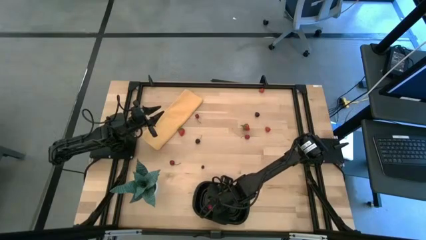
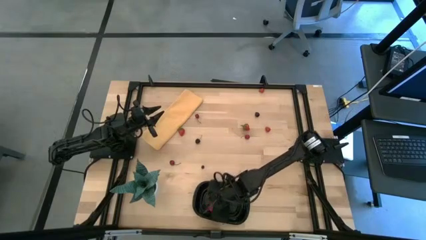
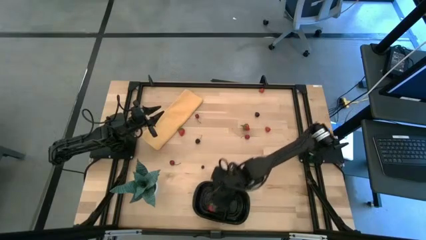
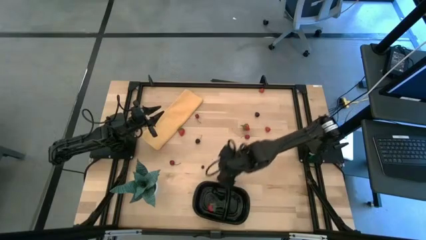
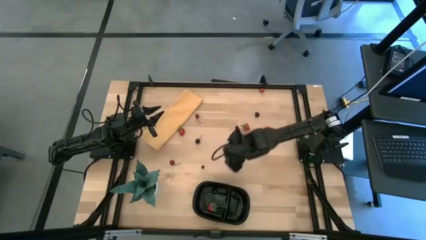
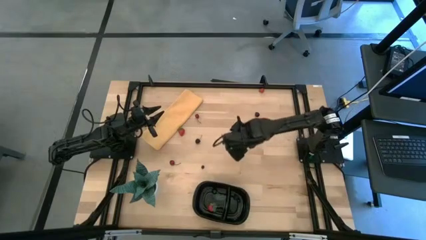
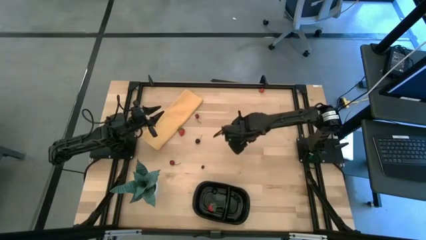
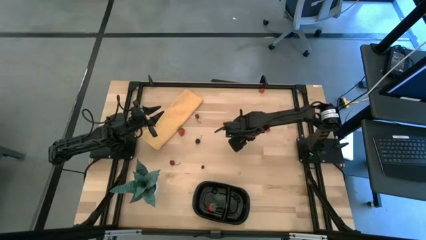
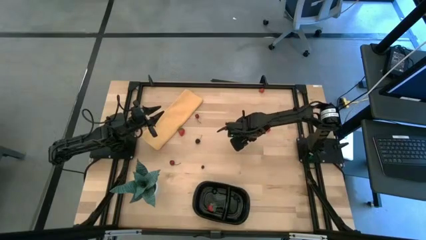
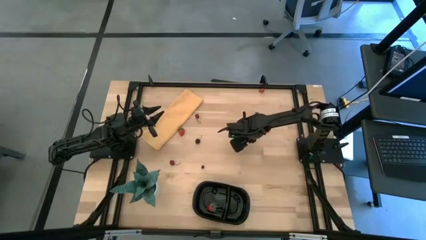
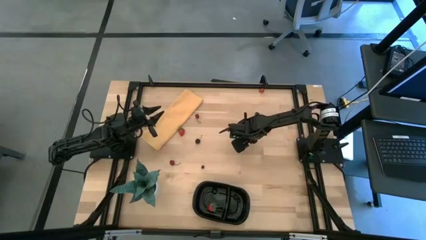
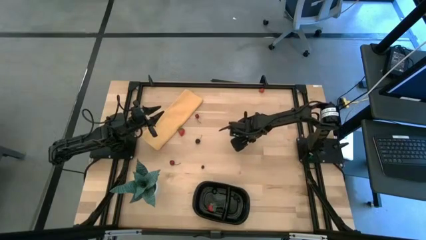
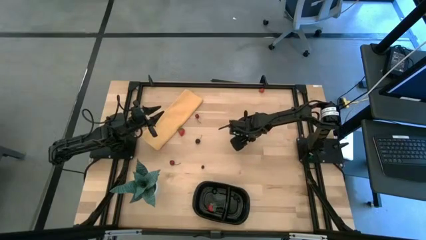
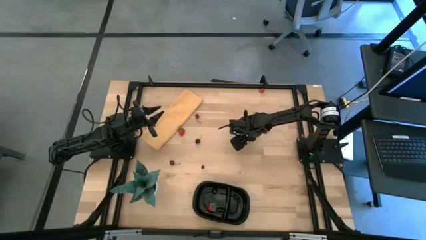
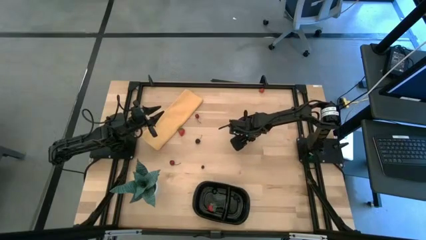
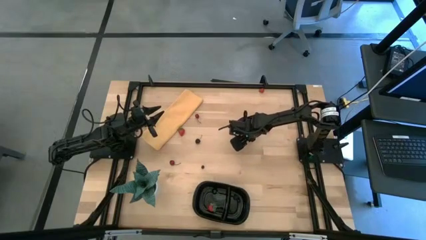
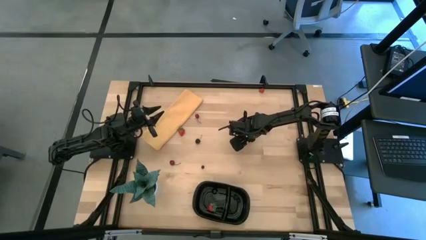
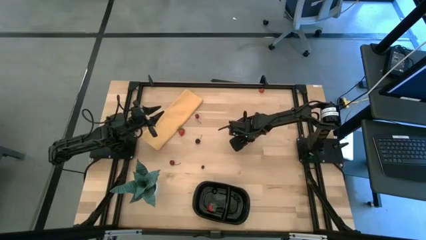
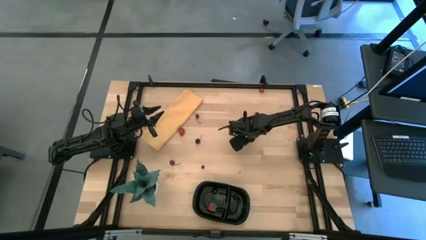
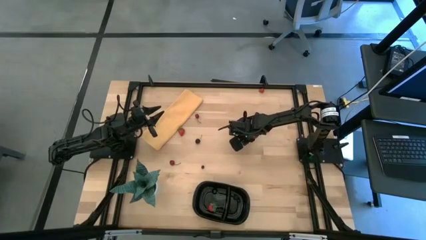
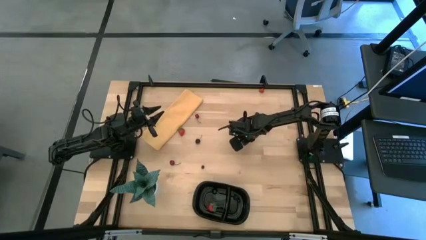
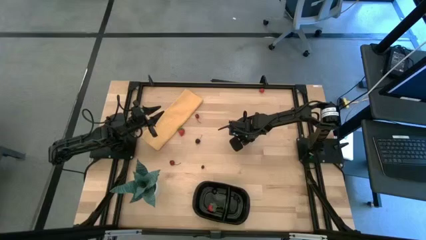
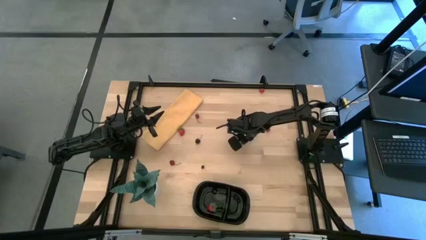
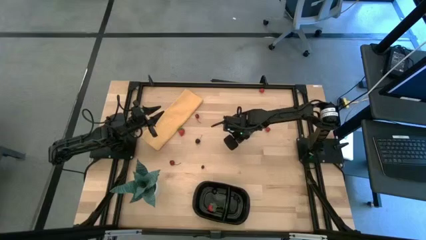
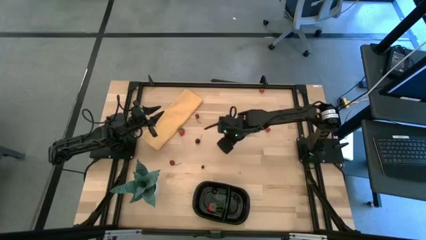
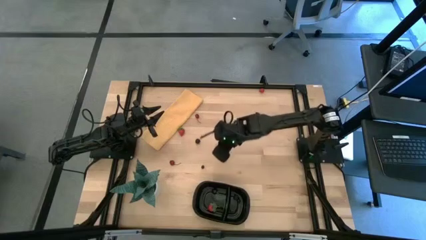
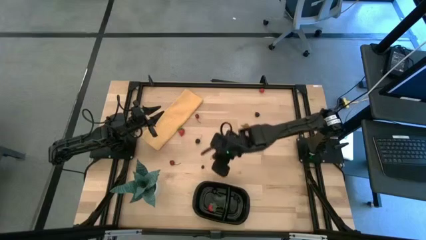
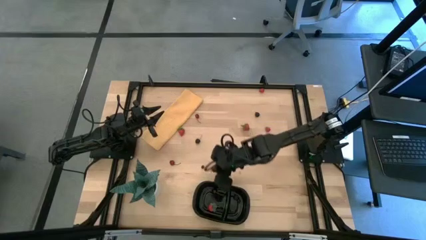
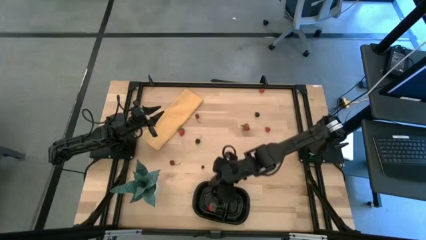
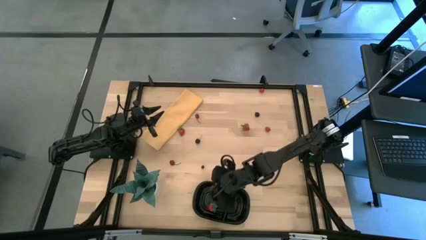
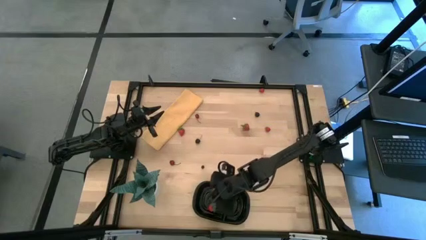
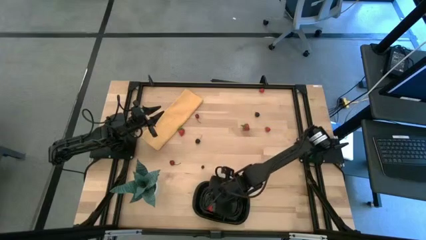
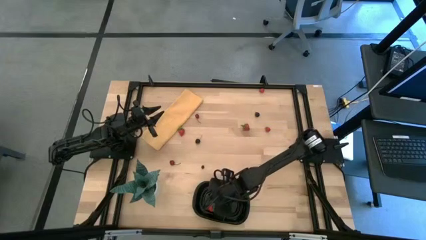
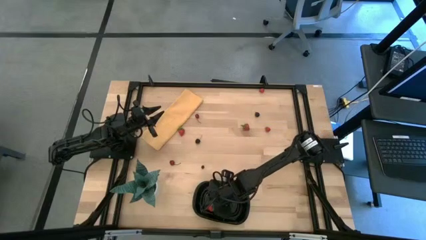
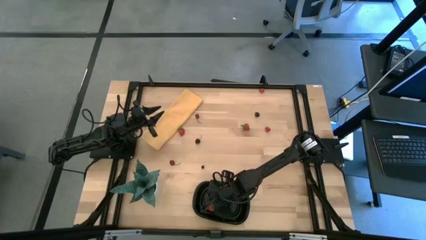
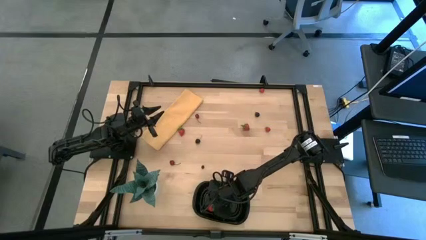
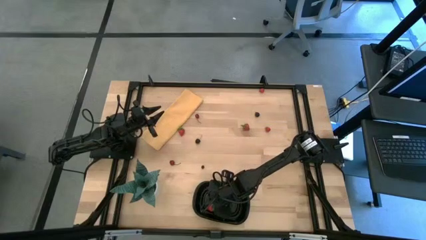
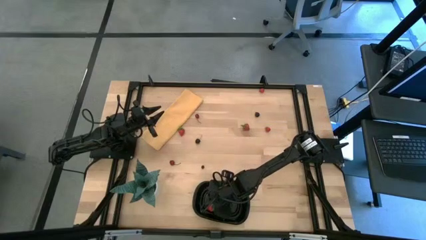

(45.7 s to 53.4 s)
Task: Pick and placing Produce into tupperware
Put the top right red cherry into the black container

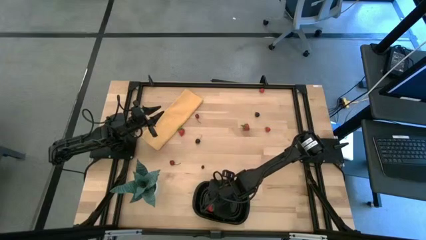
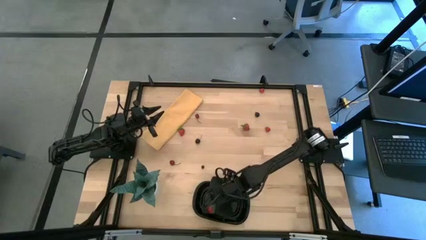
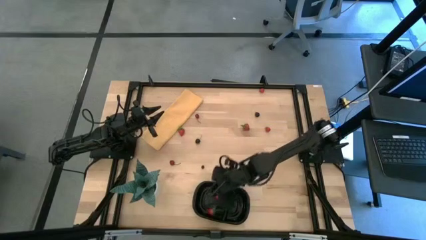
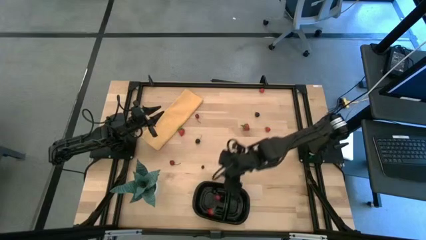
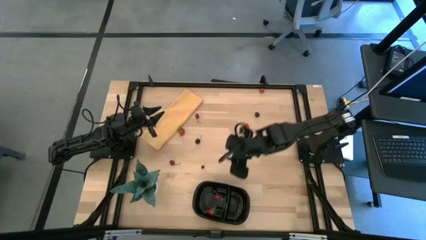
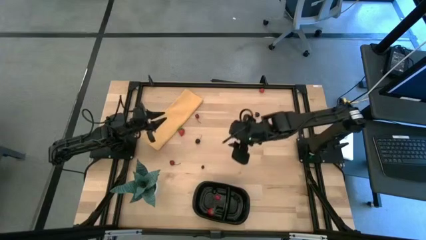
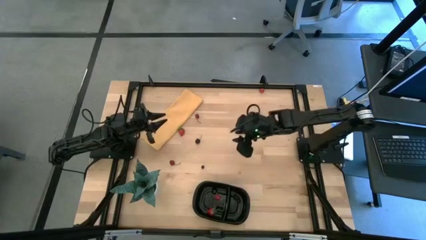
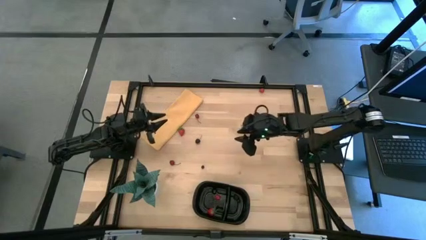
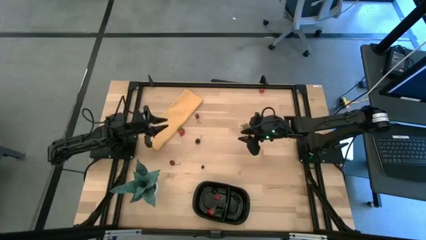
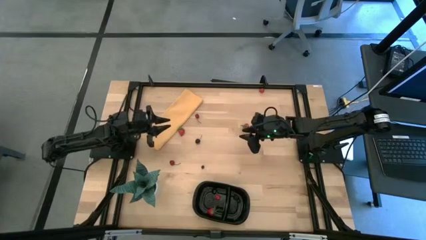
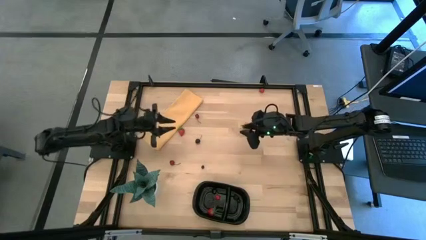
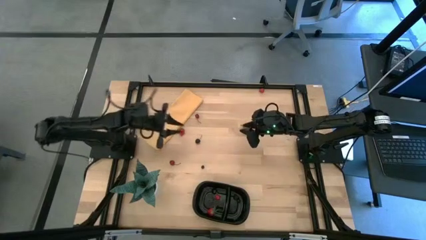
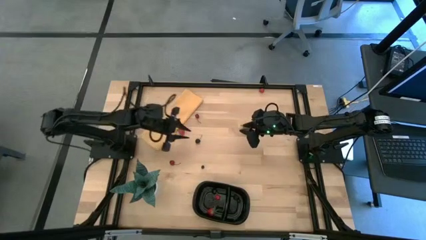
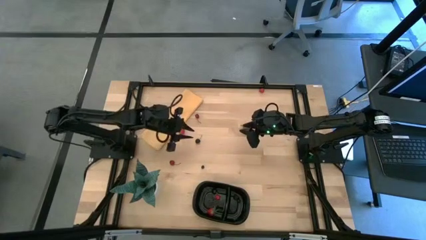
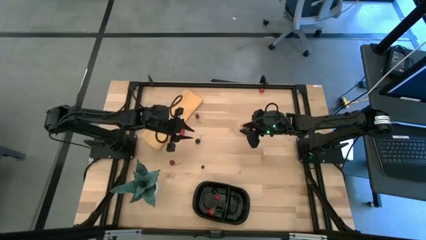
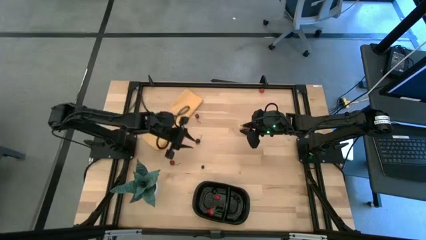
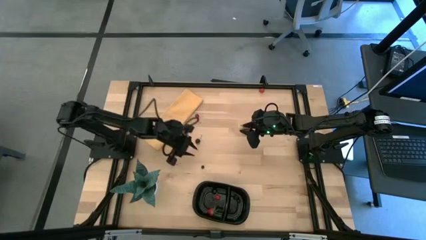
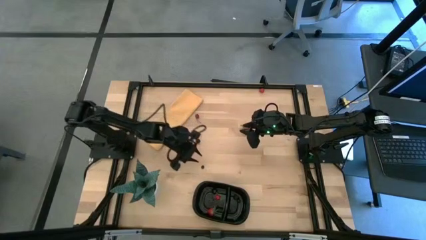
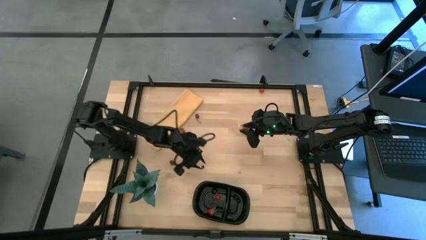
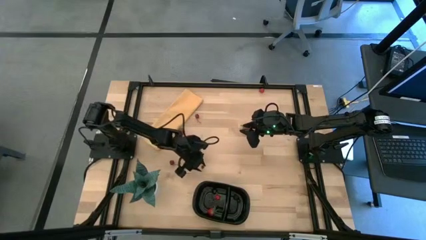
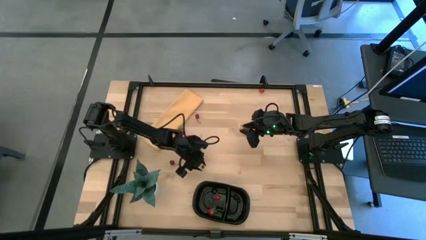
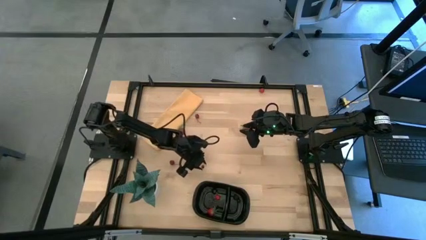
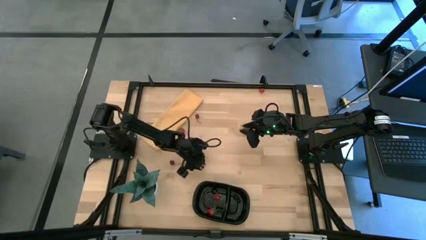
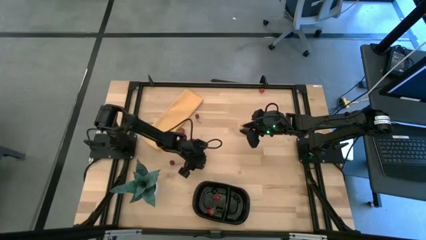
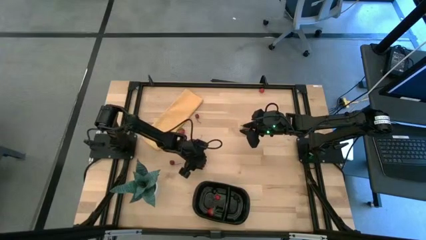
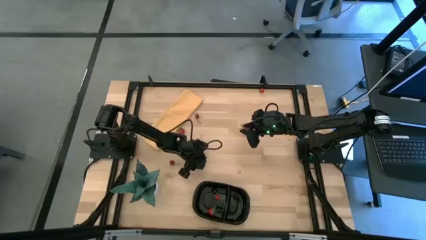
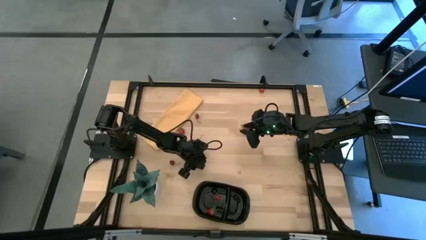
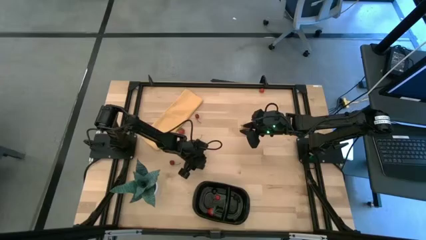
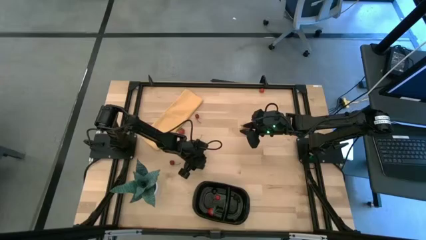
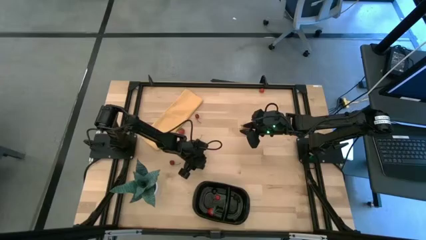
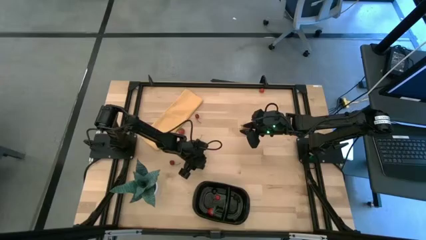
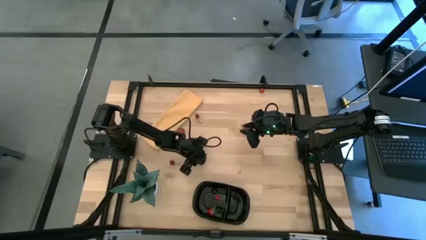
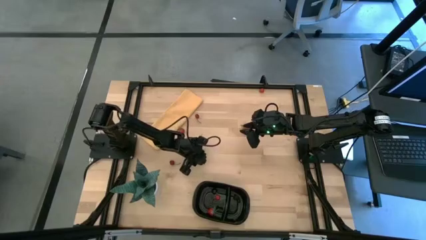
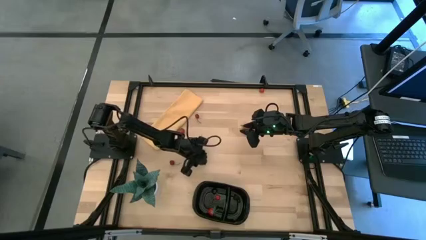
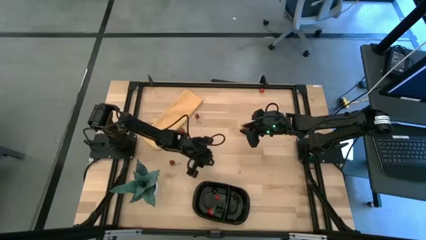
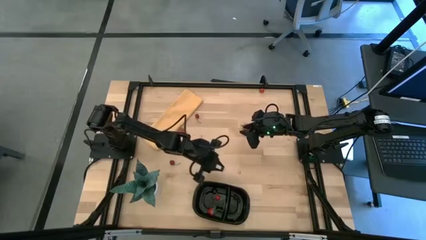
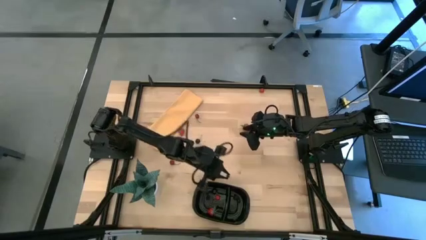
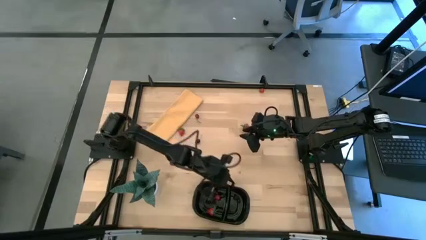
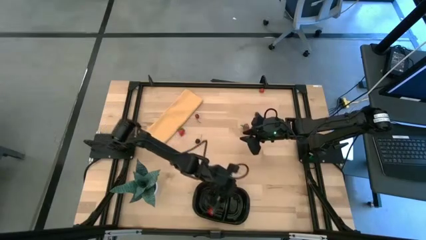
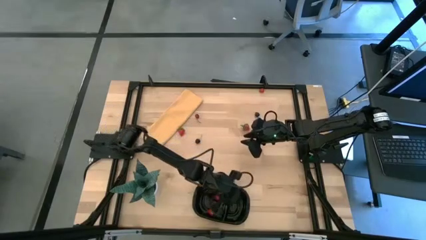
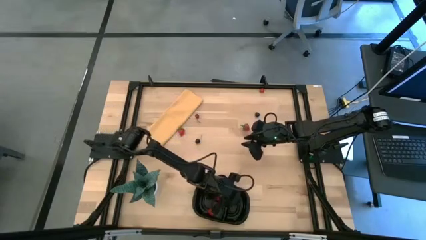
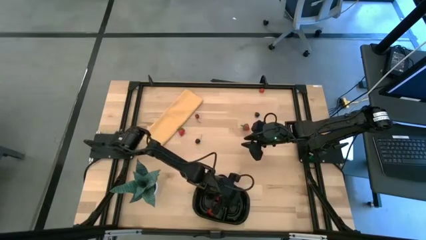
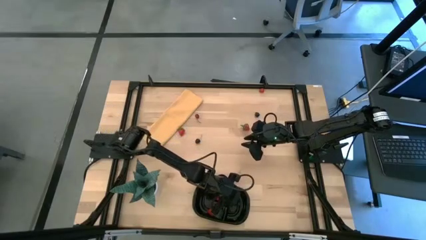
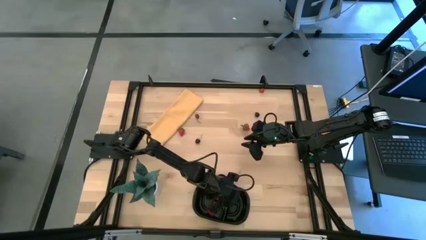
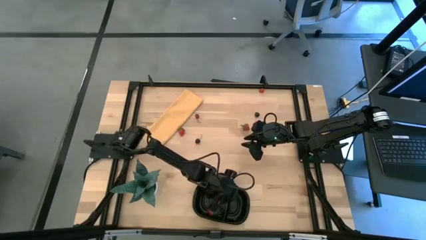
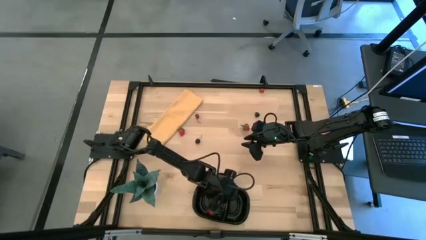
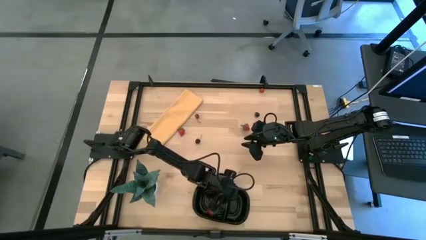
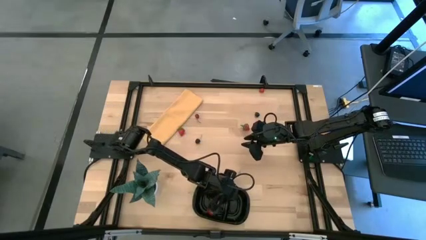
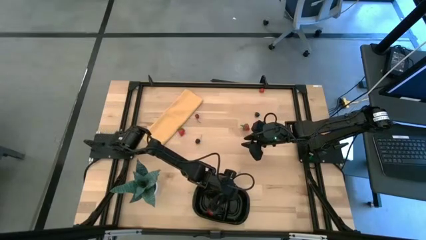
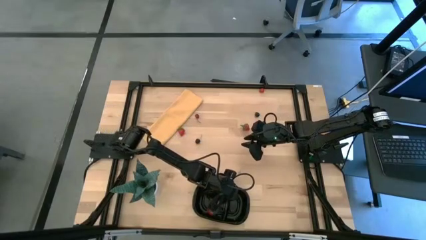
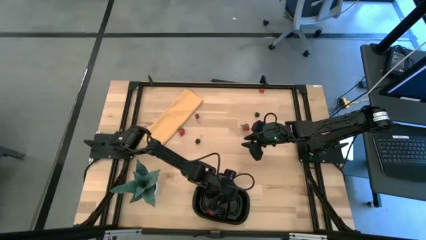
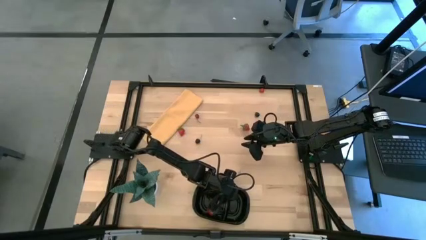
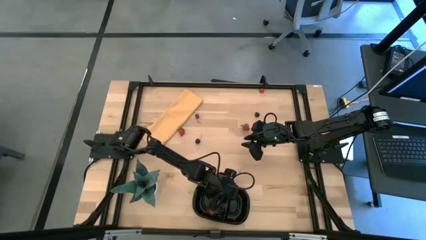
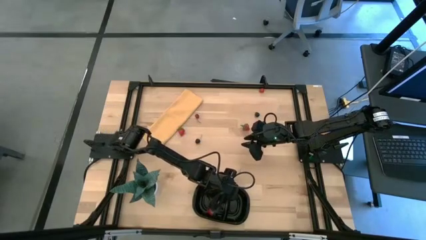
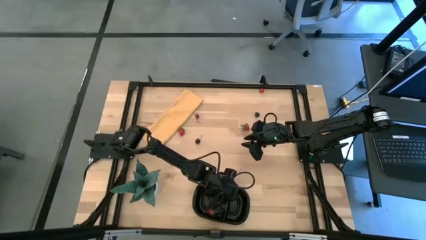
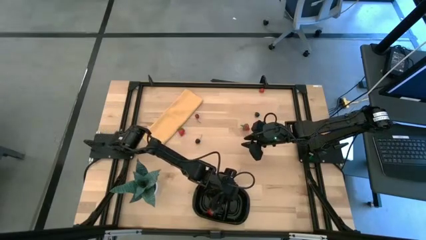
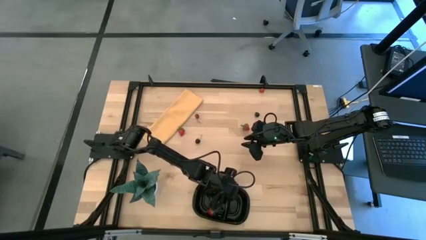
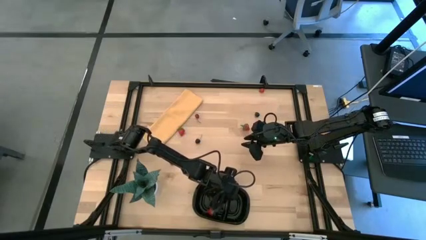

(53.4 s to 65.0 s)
Put the blueberry into the black container
